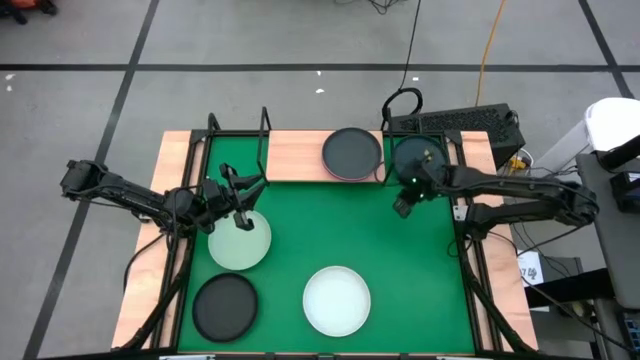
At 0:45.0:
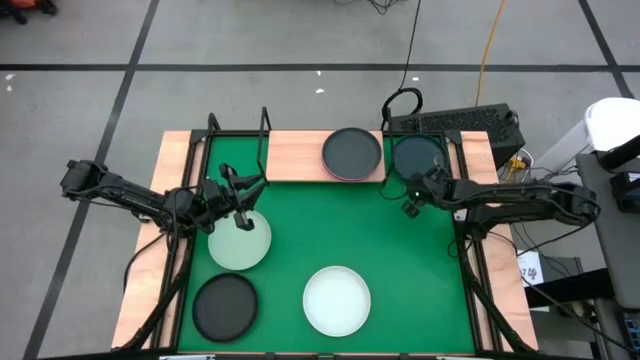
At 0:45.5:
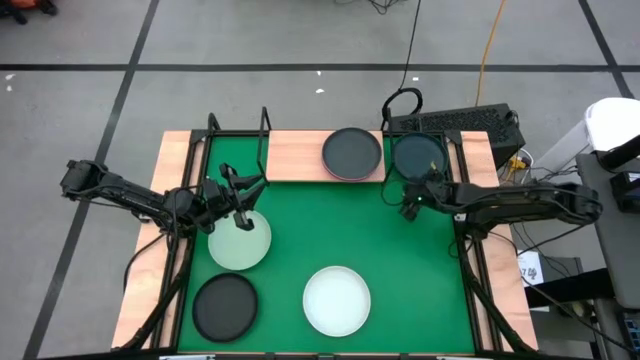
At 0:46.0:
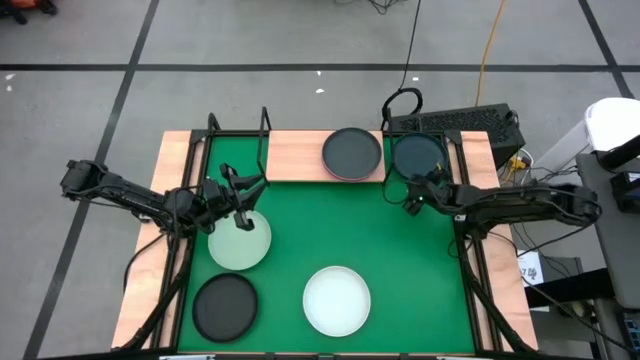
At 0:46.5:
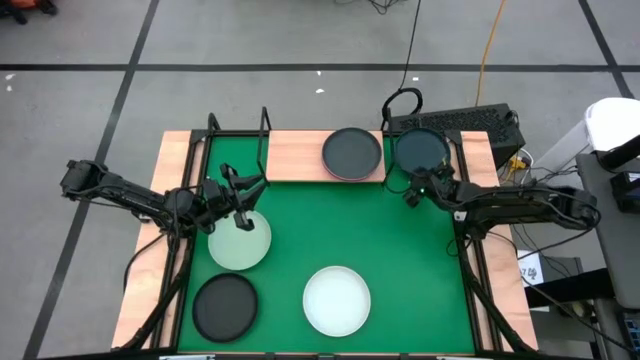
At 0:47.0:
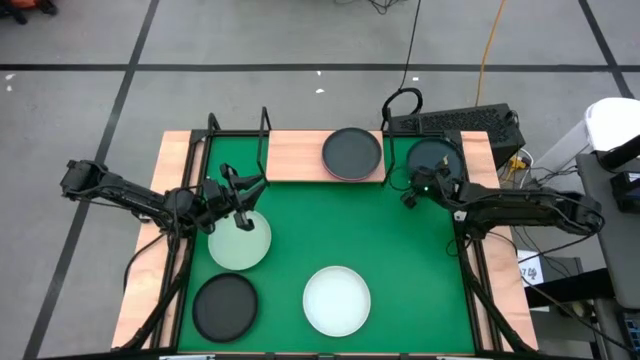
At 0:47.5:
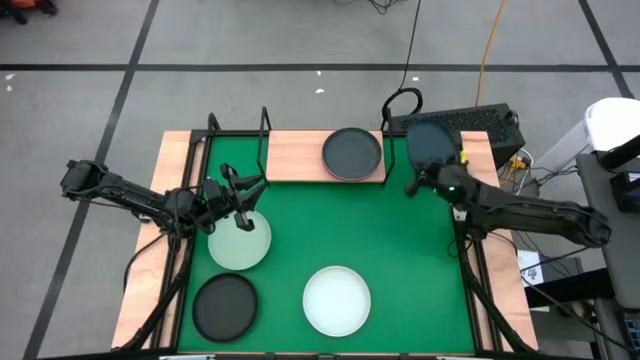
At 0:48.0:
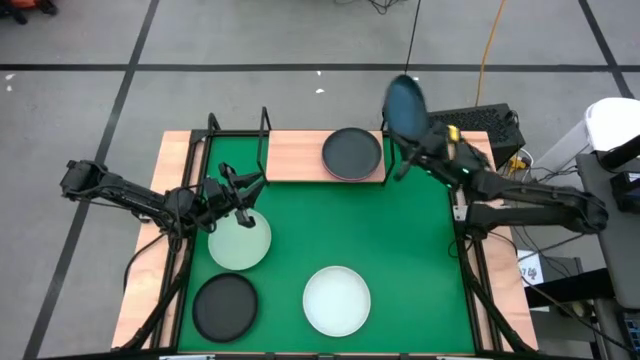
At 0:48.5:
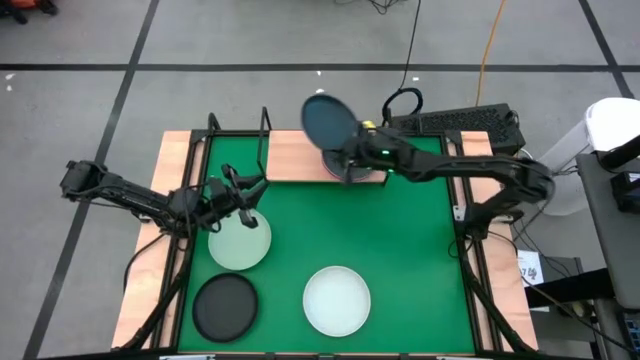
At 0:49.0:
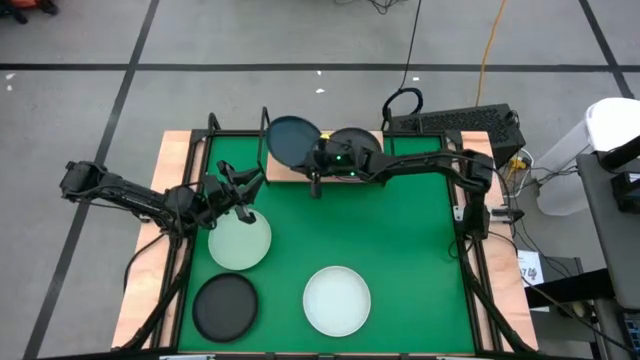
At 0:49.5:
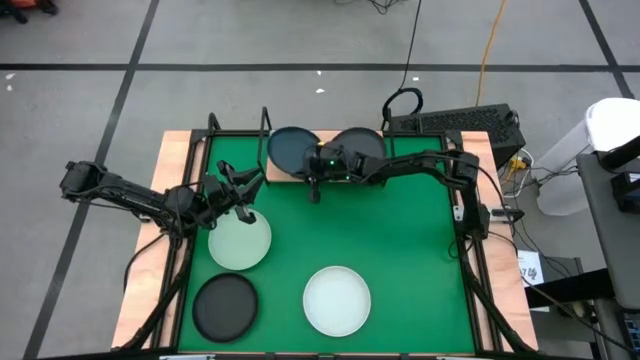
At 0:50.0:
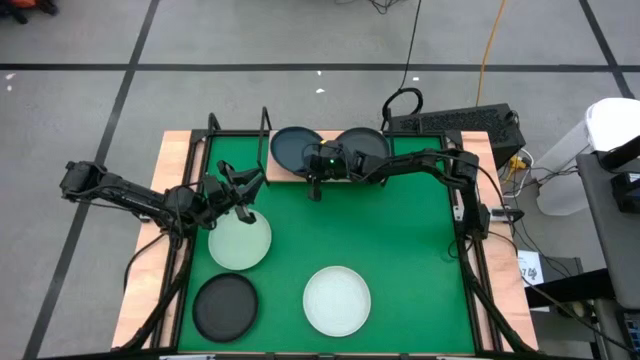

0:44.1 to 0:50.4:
Task: Place and stack plates onto a shelf
Put the dark blue plate on the shelf

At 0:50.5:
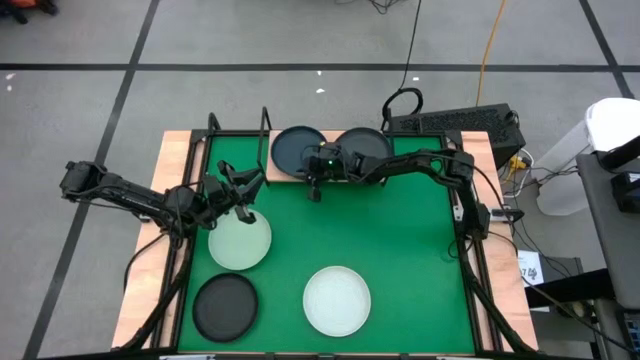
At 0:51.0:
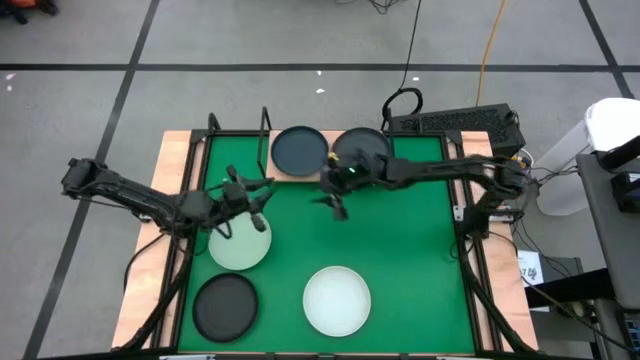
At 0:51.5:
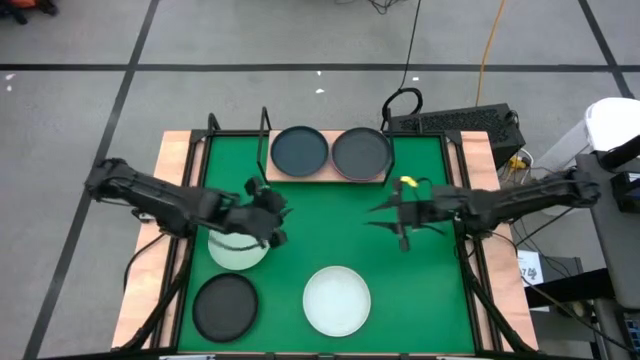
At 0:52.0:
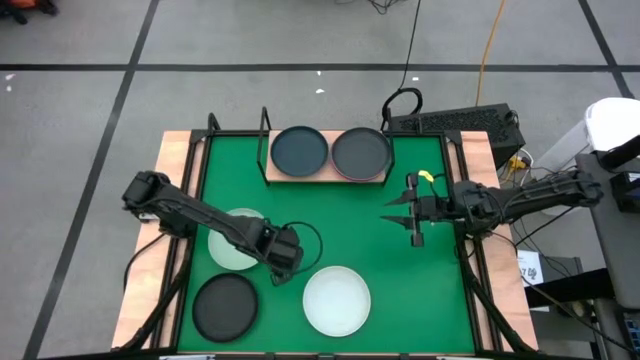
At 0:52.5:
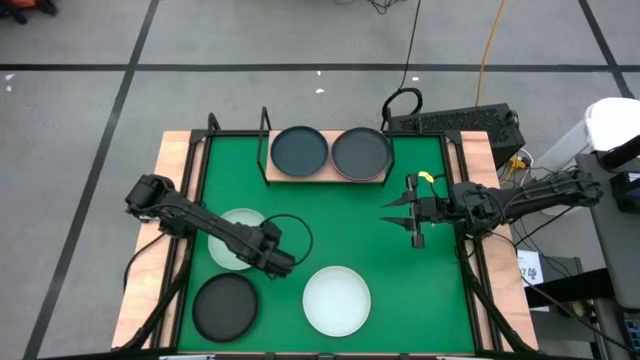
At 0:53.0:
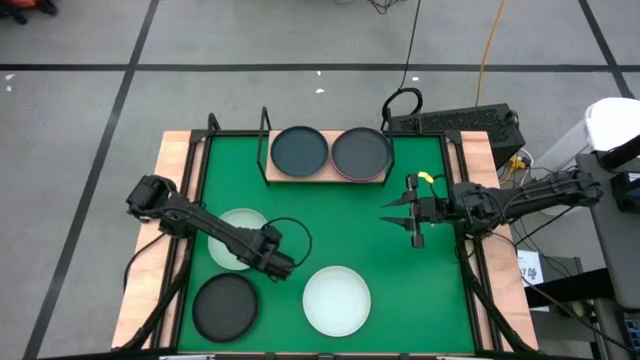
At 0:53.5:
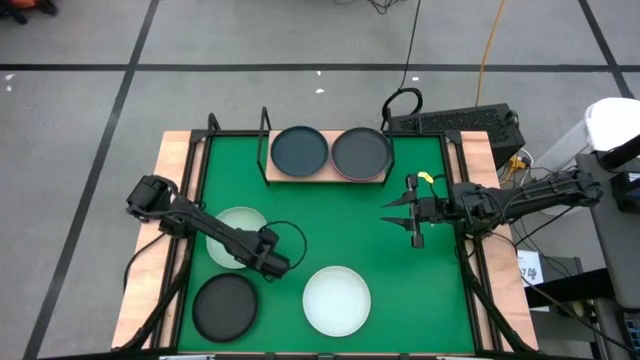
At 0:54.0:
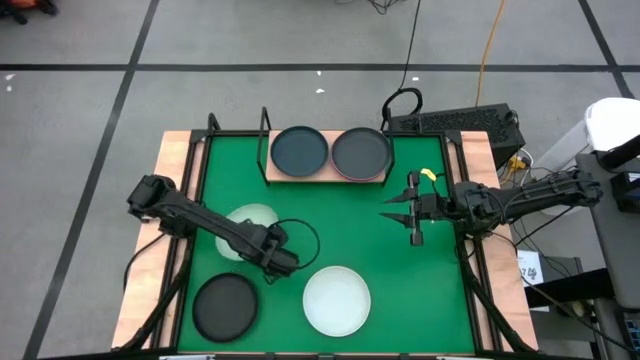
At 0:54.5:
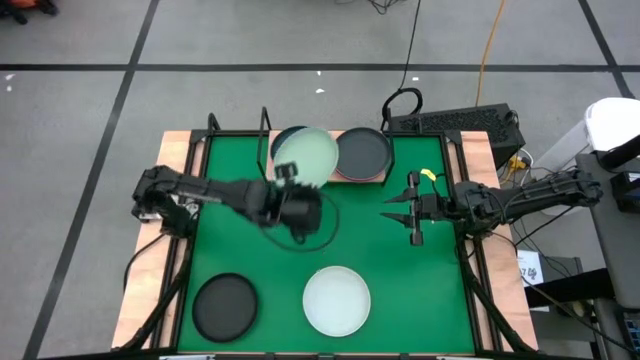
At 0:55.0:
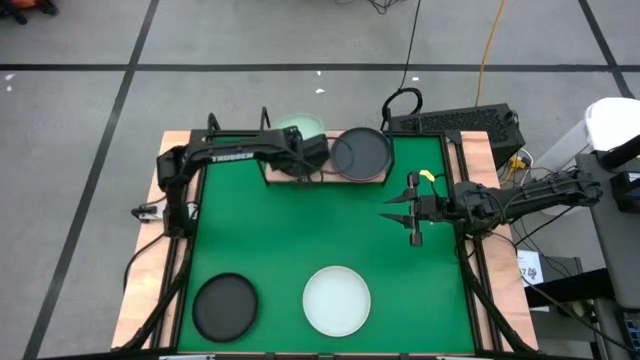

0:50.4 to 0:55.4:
Stack the light green plate on top of the dark blue plate on the shelf

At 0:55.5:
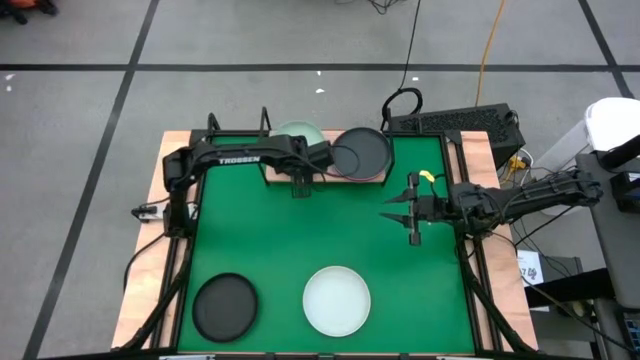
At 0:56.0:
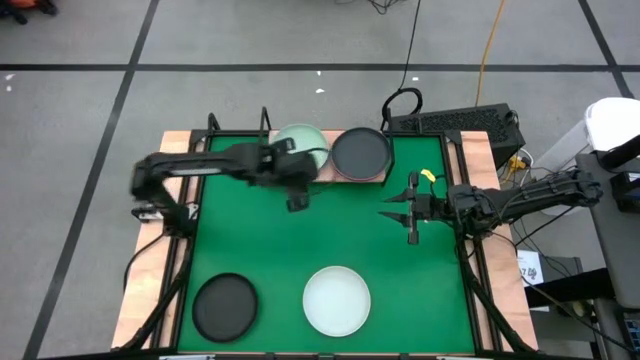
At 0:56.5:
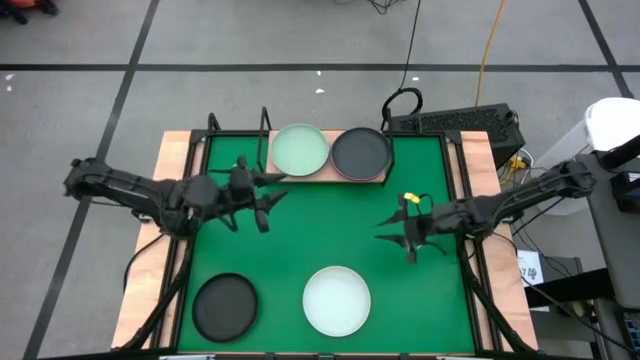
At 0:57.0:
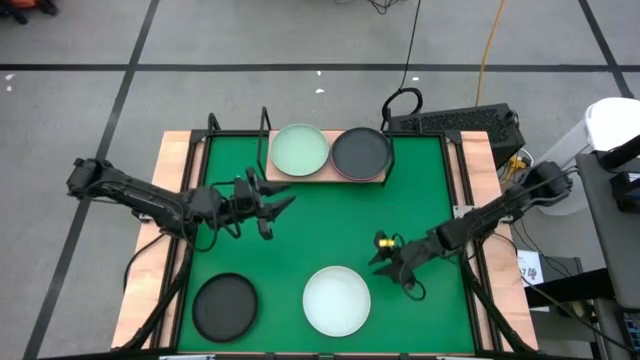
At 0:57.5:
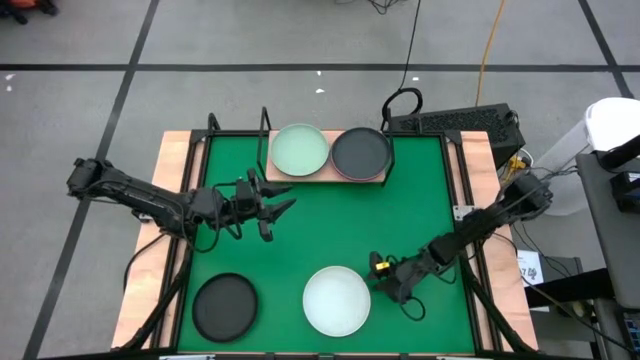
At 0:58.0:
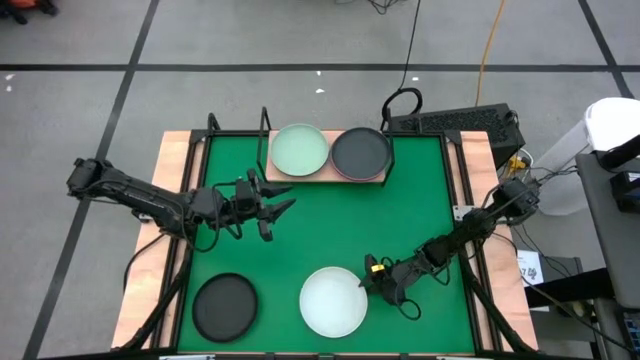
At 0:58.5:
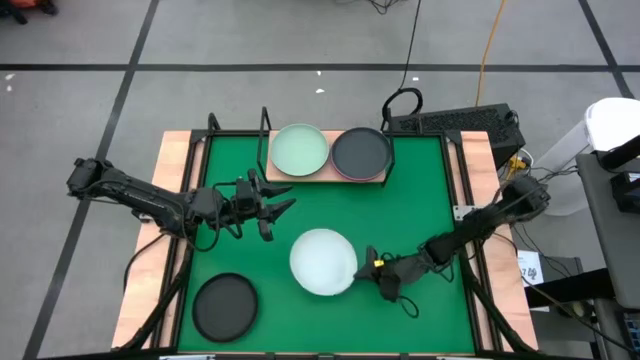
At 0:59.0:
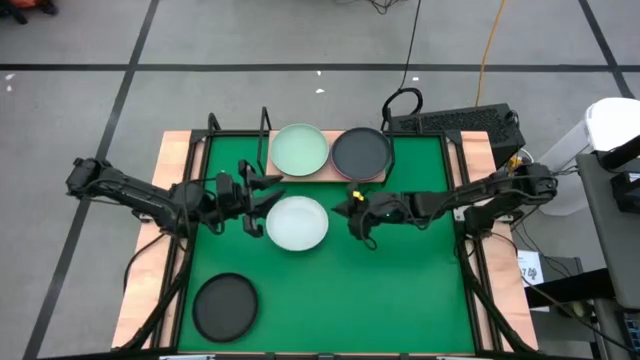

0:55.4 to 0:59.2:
Stack the white plate on top of the light green plate on the shelf

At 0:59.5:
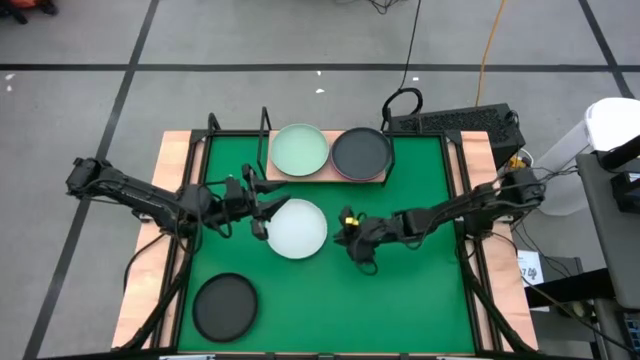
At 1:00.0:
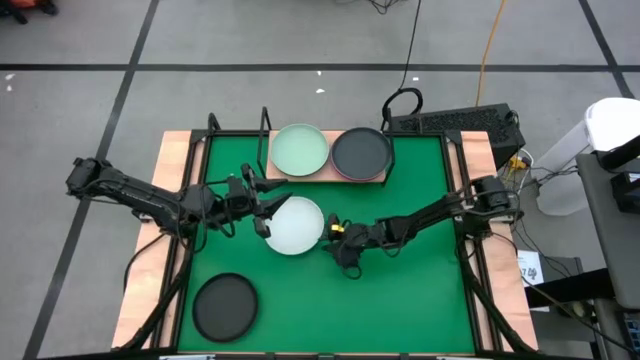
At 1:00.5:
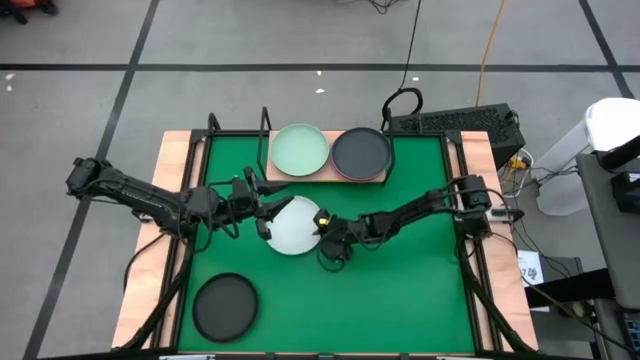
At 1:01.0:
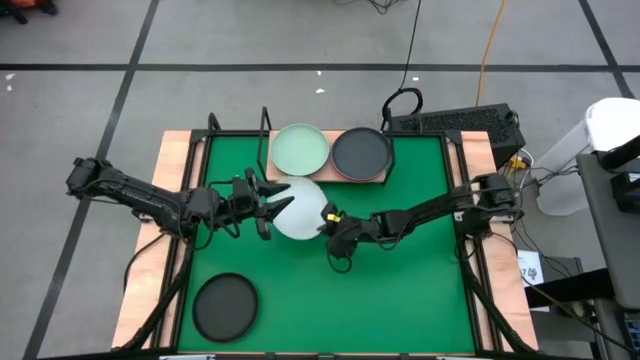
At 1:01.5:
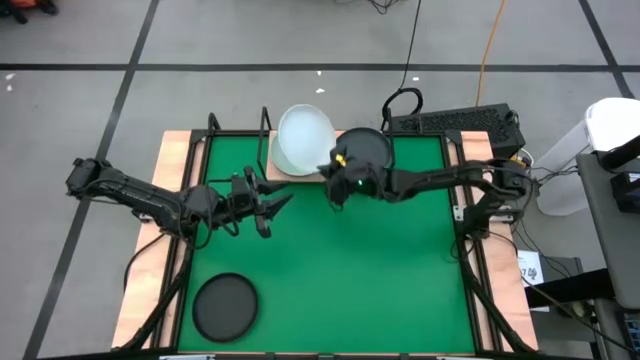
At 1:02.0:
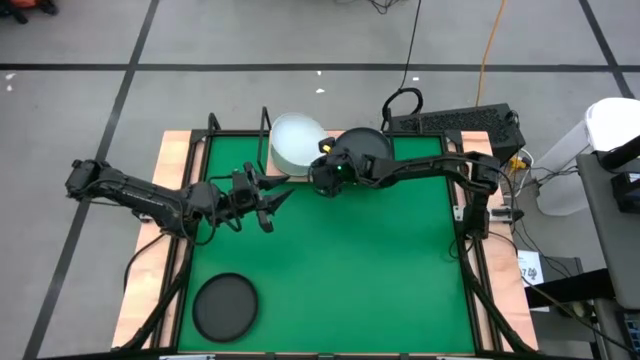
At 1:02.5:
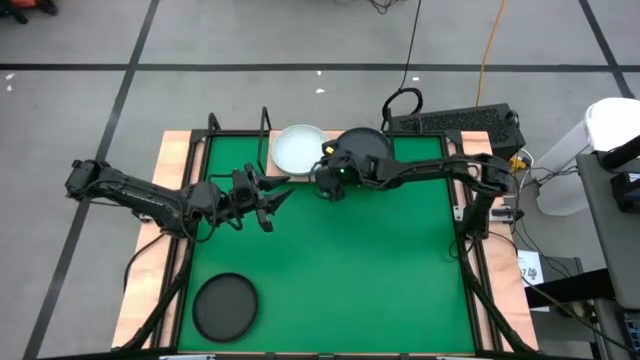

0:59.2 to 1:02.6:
Stack the white plate on top of the light green plate on the shelf

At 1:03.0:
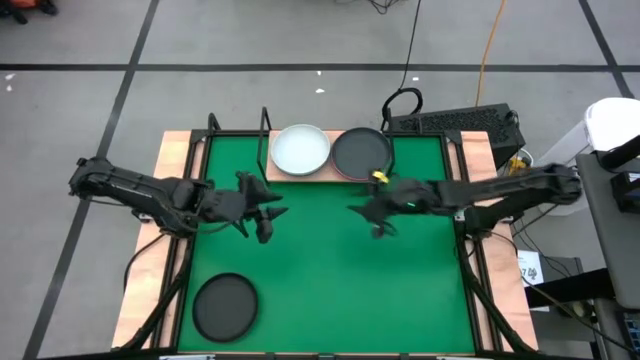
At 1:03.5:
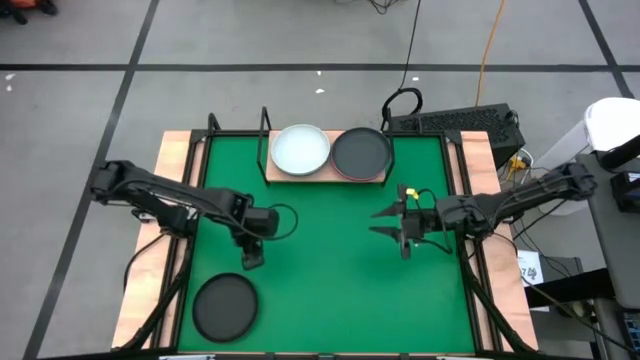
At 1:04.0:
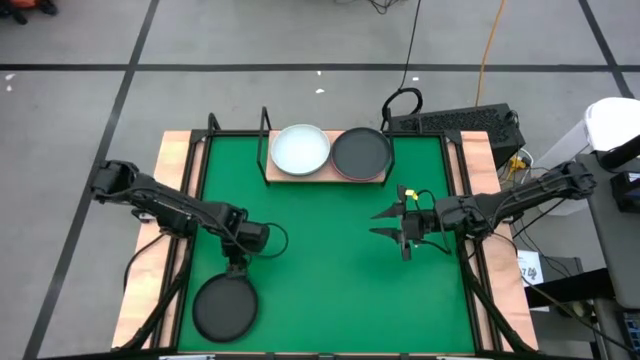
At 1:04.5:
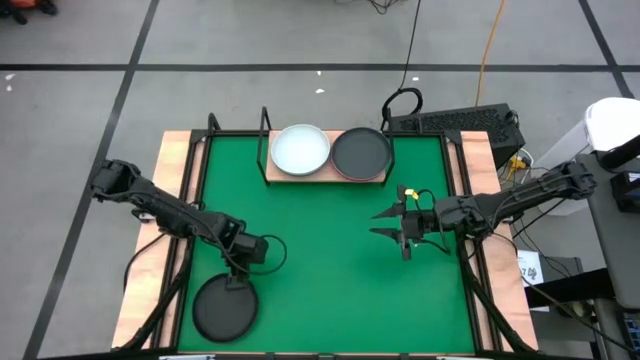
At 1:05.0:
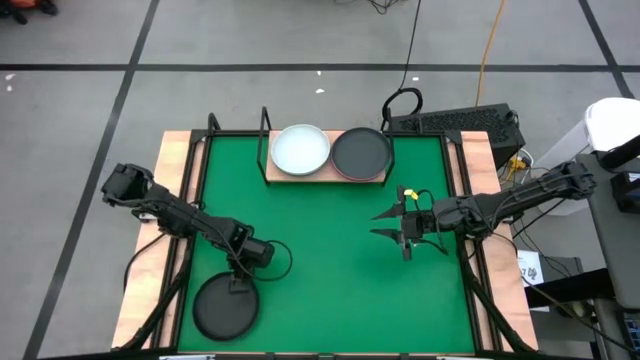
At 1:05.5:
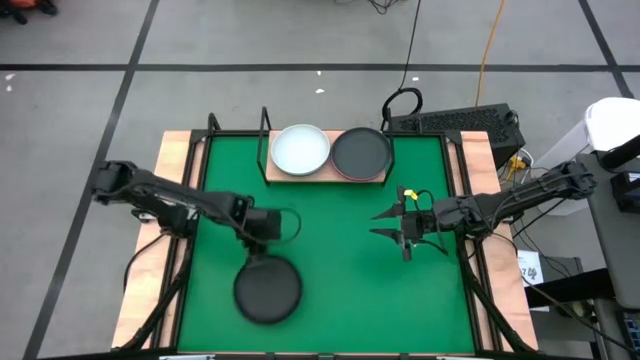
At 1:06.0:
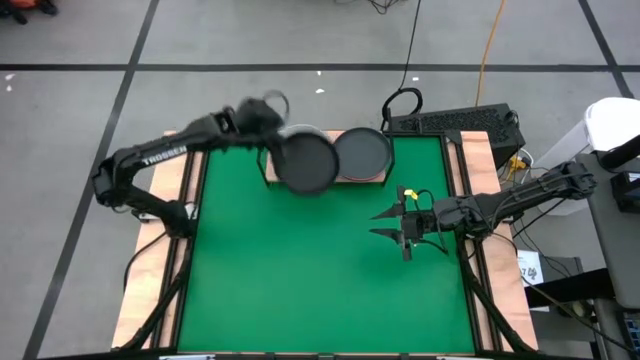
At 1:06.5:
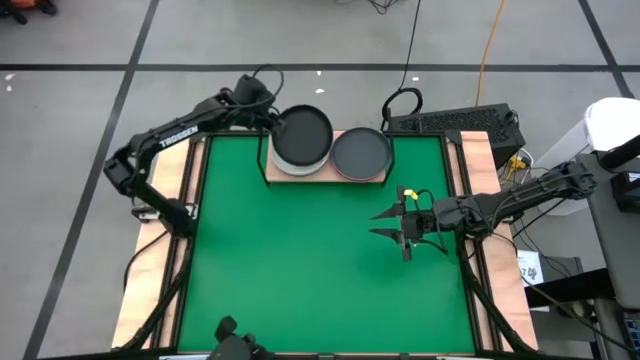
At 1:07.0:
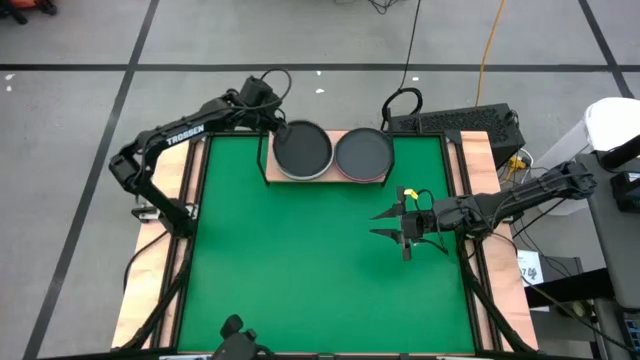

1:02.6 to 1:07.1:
Stack the black plate on top of the white plate on the shelf
